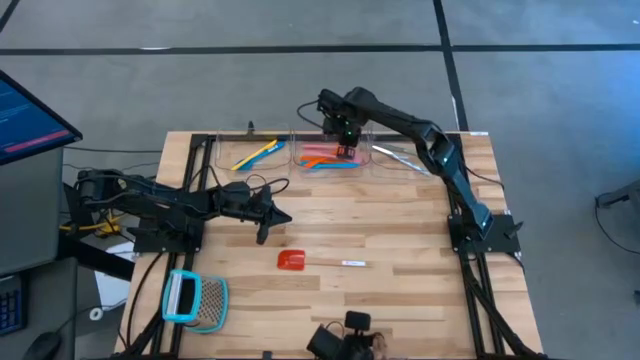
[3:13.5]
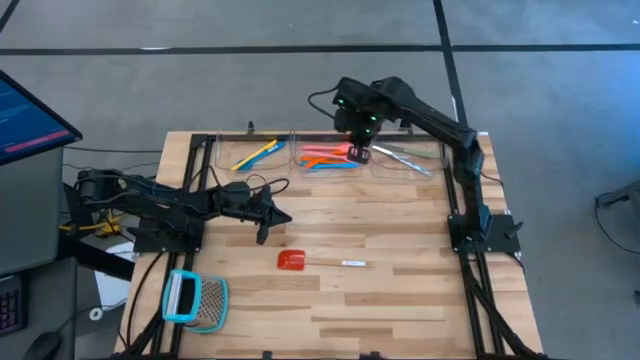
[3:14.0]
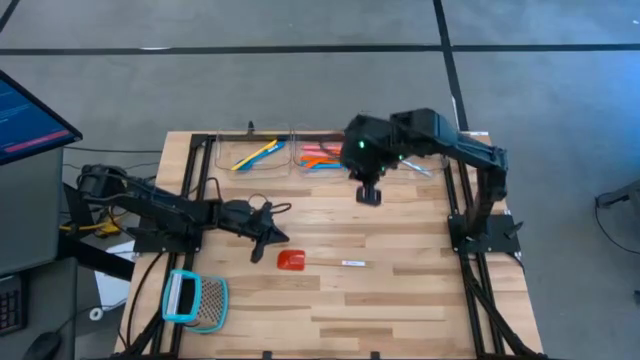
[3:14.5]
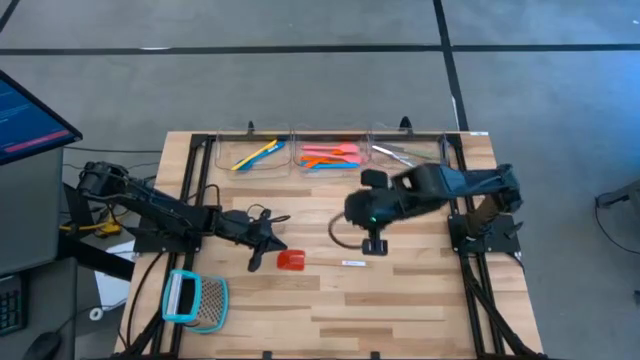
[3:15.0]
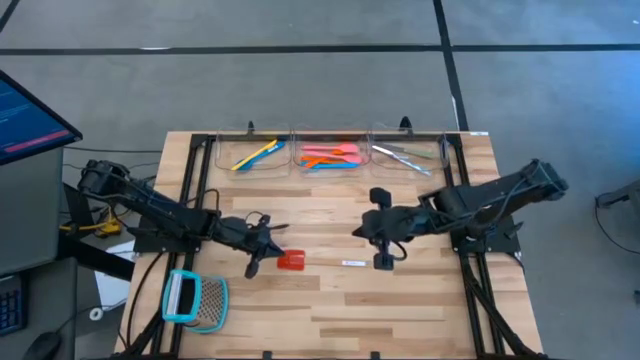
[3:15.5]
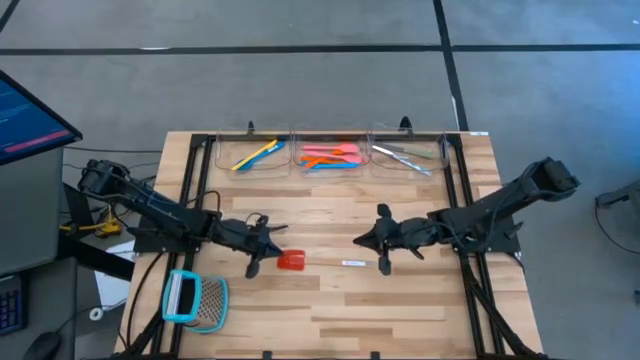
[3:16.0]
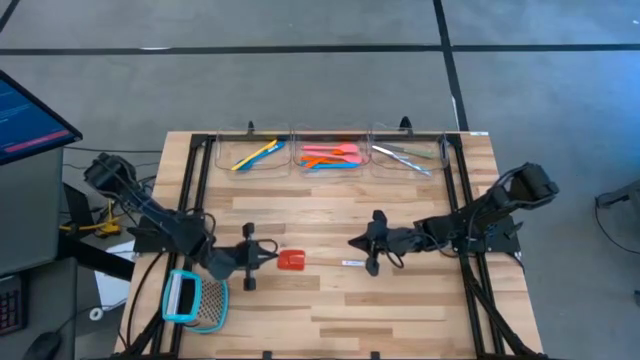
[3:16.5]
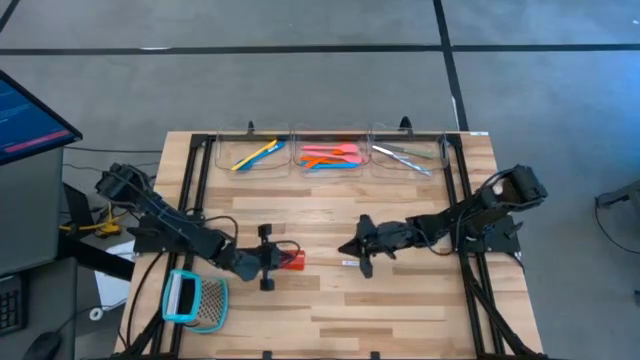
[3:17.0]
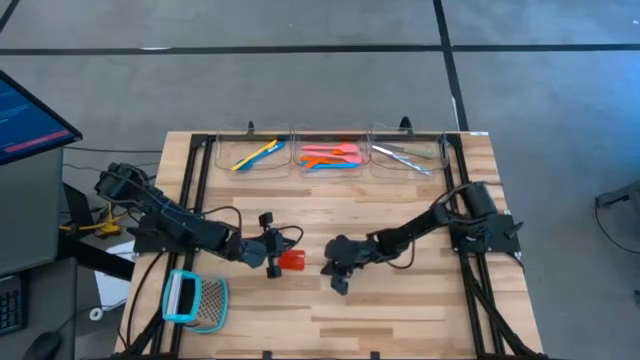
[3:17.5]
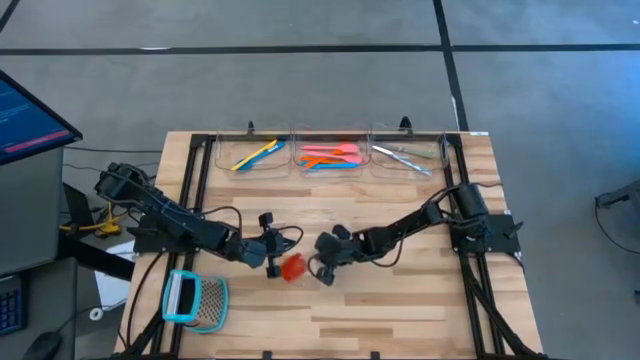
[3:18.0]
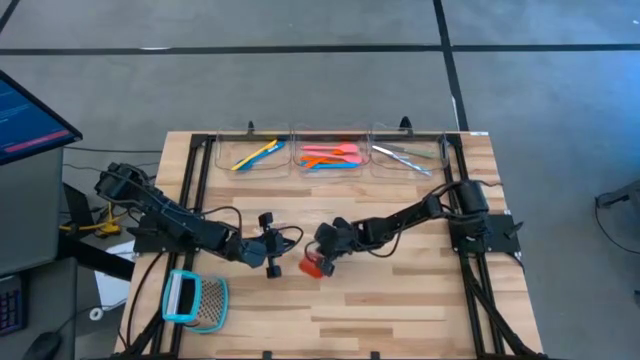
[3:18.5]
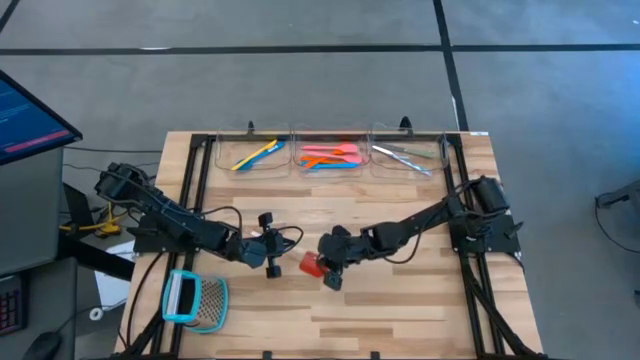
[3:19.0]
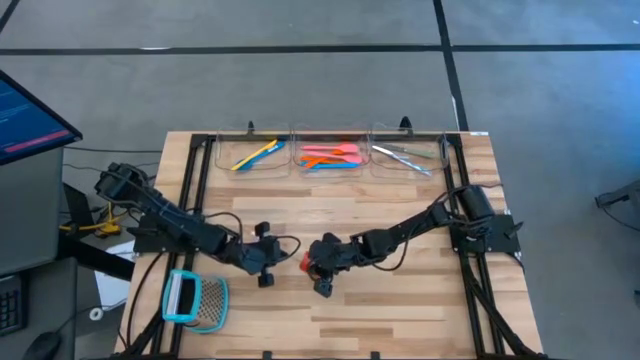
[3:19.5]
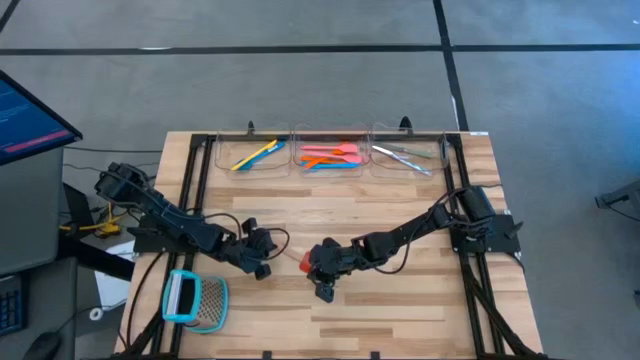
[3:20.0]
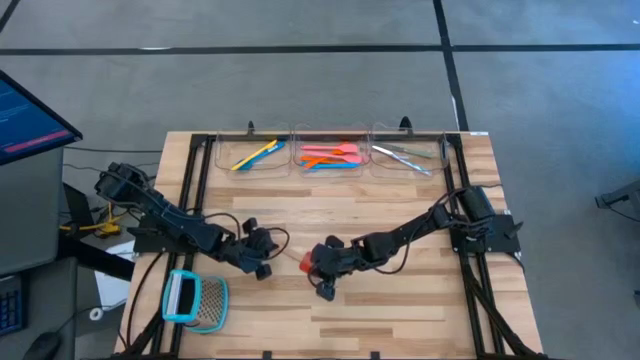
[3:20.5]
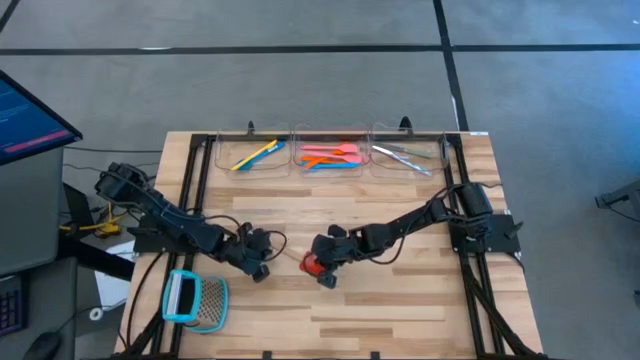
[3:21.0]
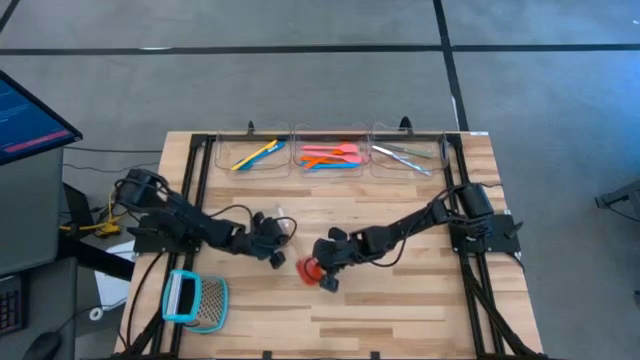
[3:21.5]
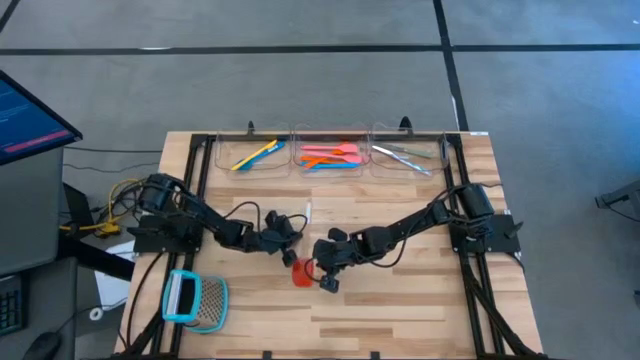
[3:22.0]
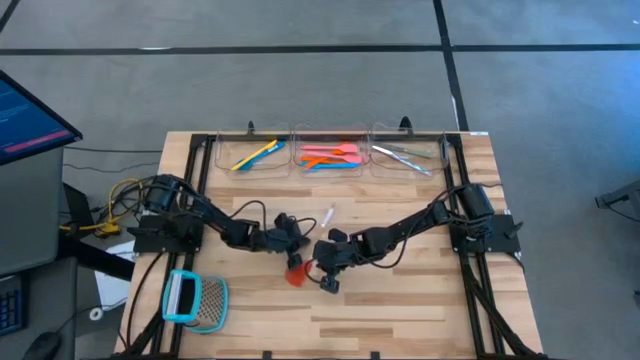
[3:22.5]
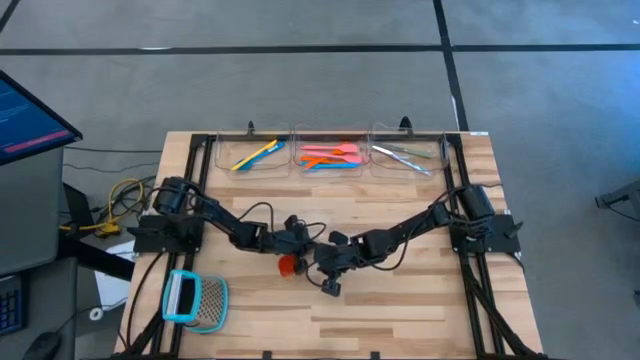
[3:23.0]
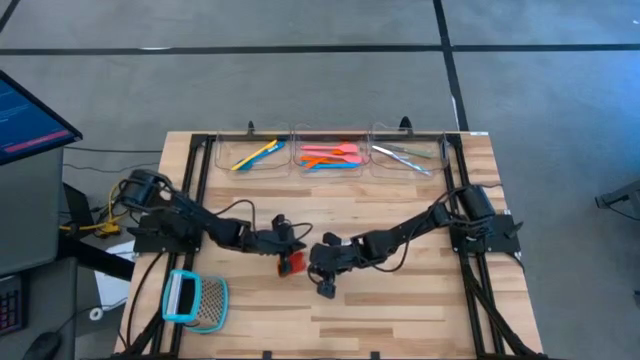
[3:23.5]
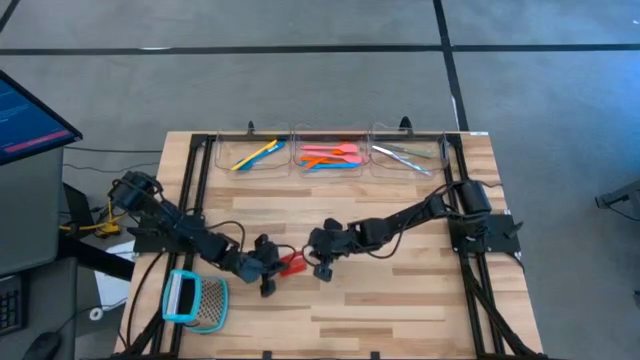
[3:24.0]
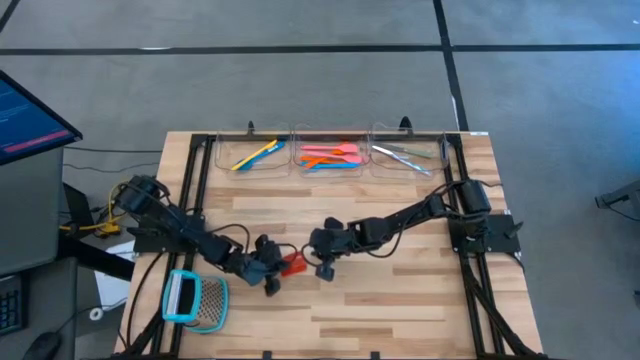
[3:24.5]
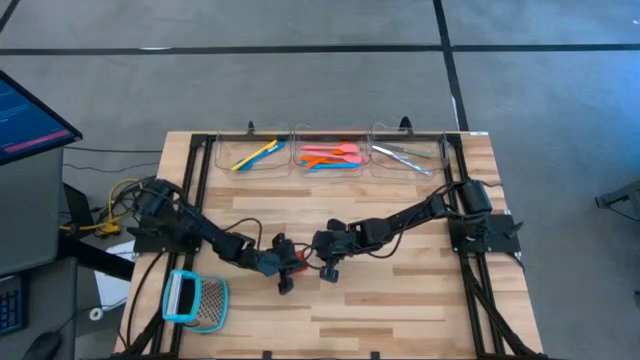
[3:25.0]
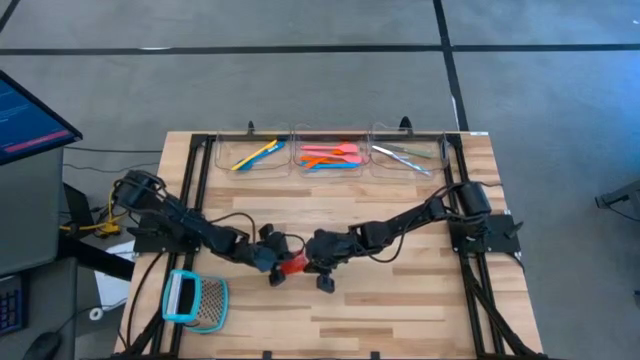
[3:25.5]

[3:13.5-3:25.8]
Task: Pick & Place Kitchen Items
Put the red spatula into the middle transparent bin

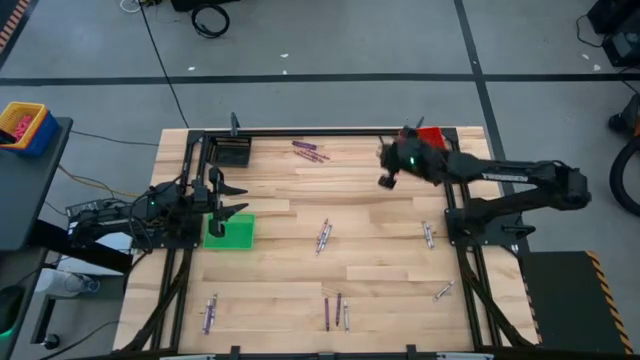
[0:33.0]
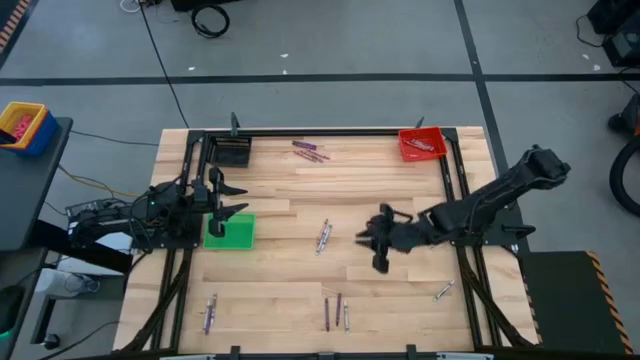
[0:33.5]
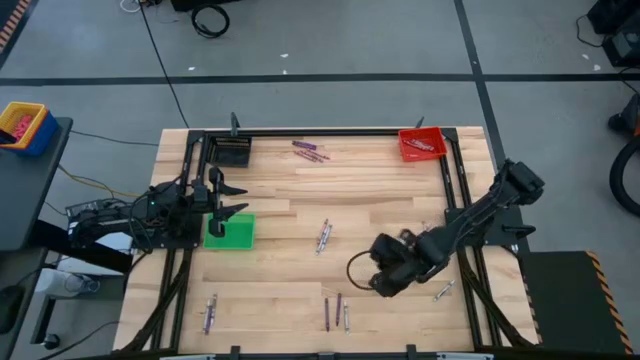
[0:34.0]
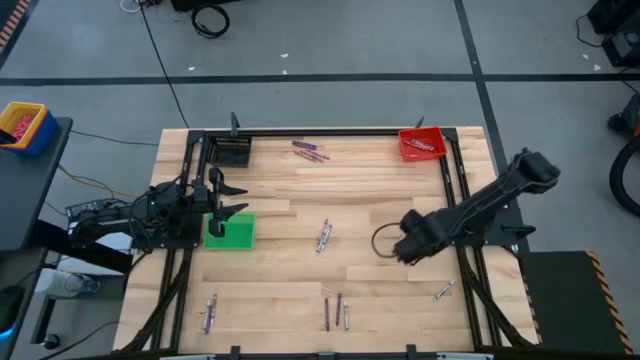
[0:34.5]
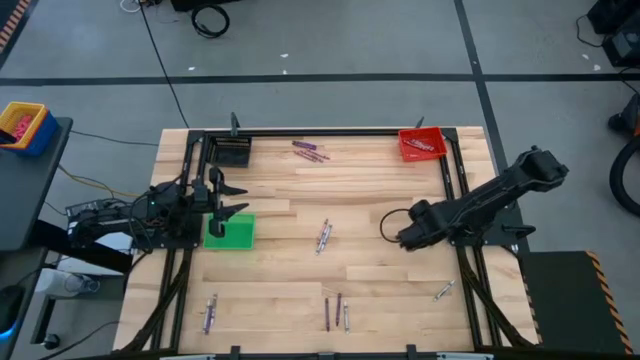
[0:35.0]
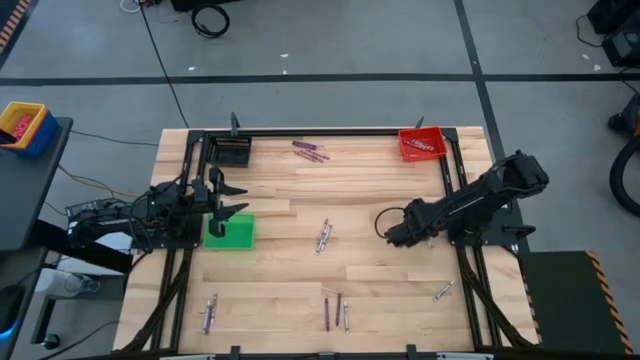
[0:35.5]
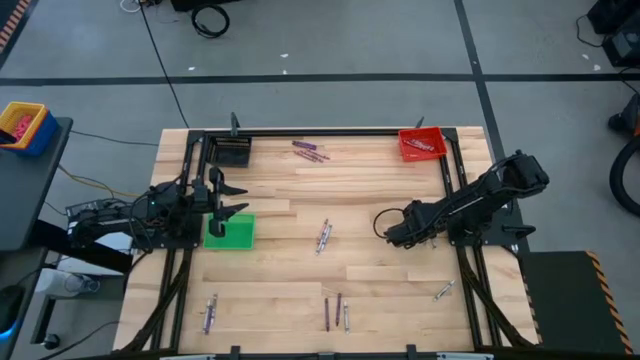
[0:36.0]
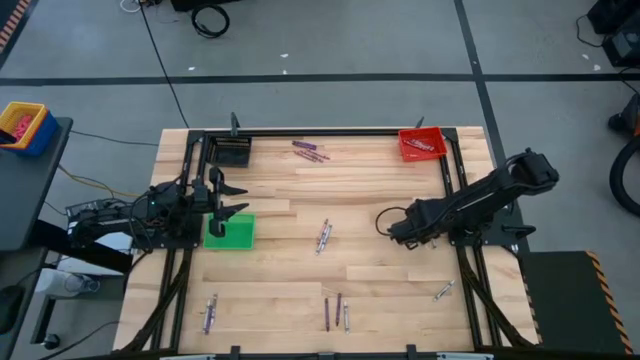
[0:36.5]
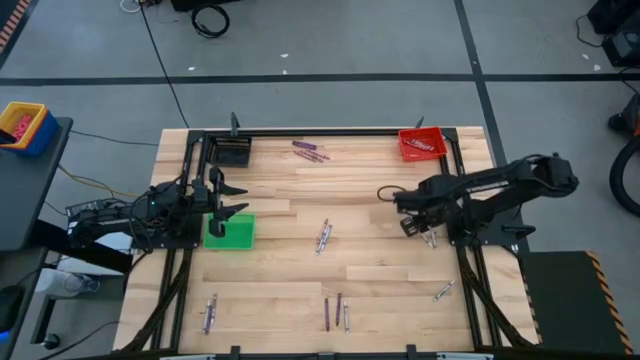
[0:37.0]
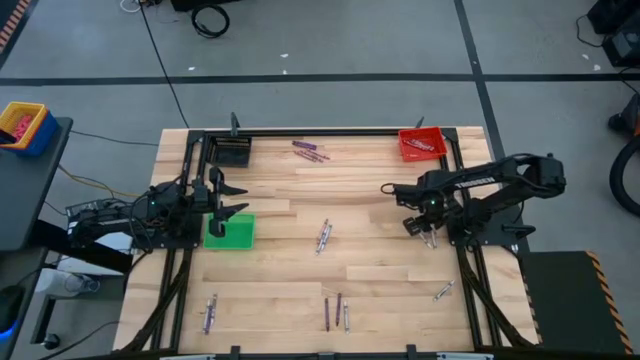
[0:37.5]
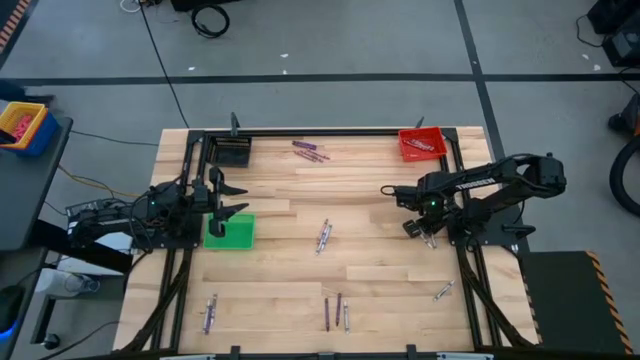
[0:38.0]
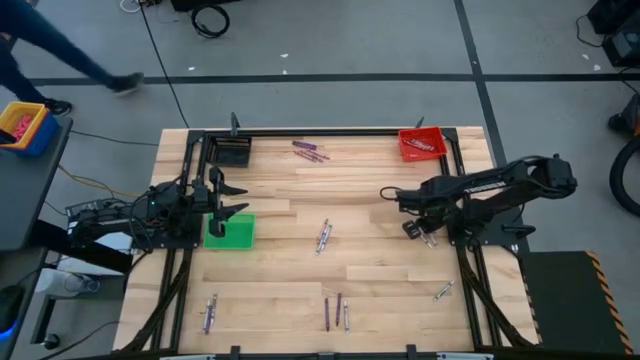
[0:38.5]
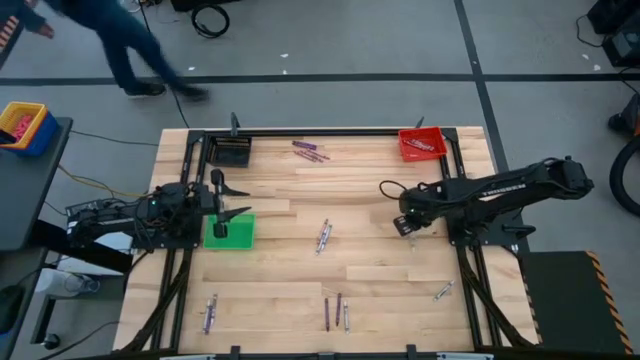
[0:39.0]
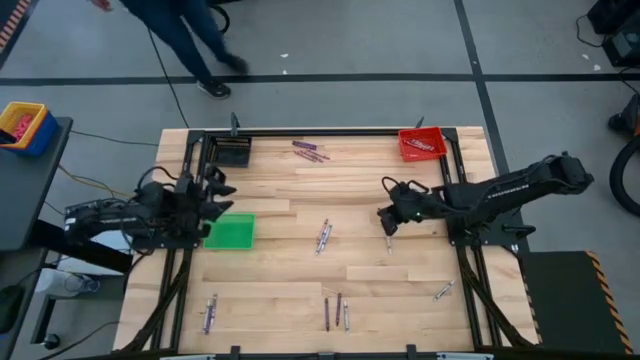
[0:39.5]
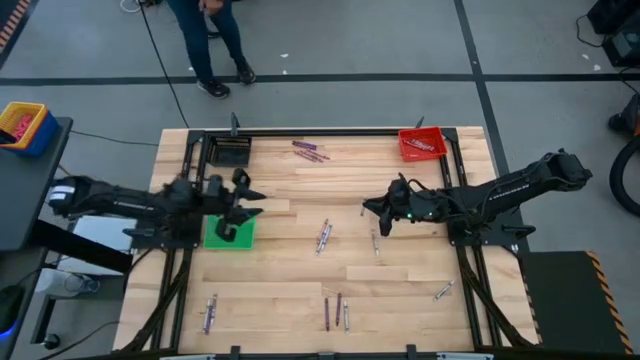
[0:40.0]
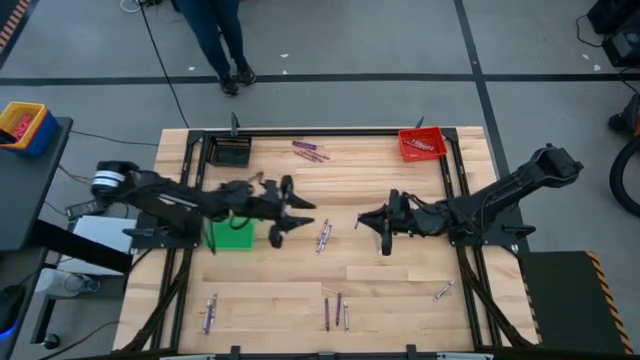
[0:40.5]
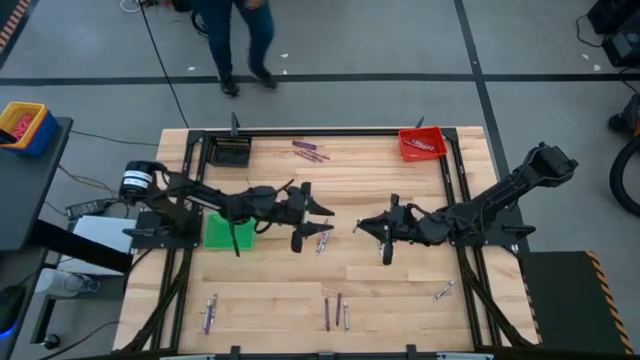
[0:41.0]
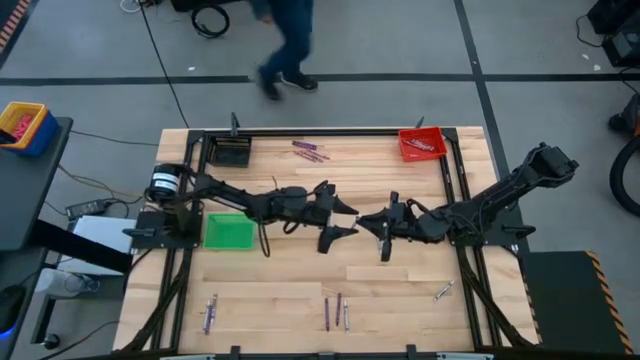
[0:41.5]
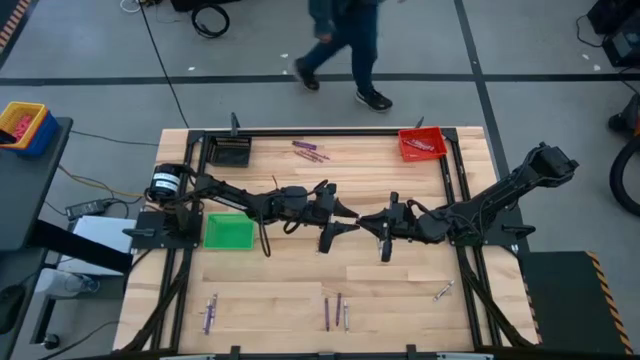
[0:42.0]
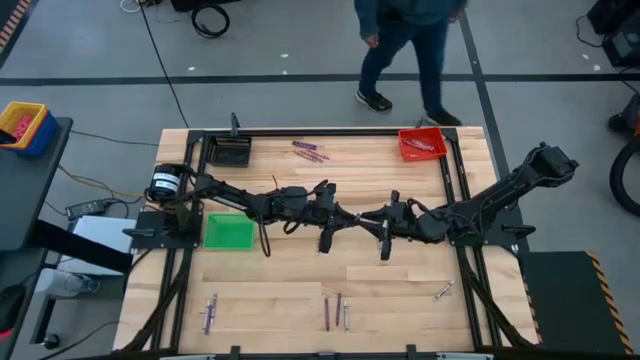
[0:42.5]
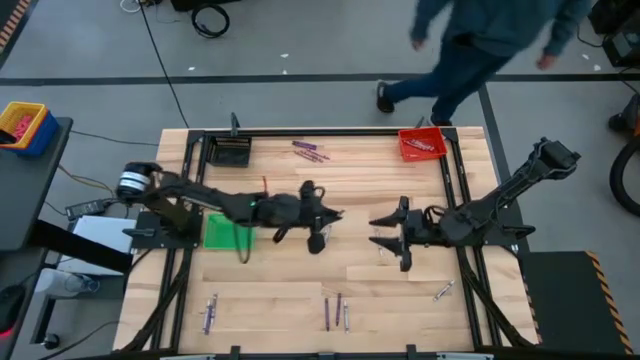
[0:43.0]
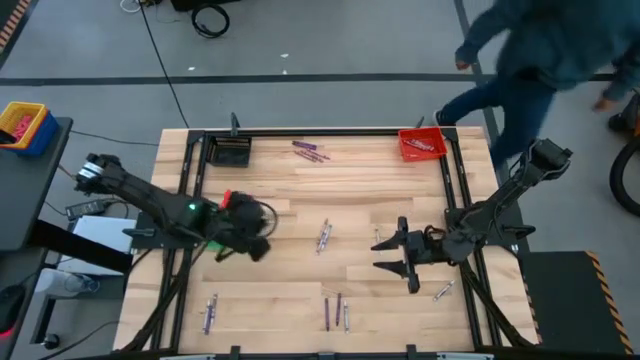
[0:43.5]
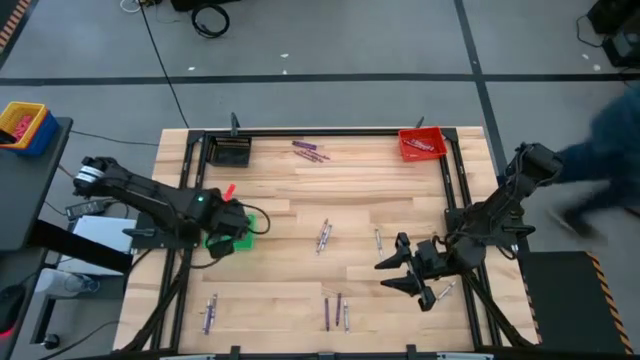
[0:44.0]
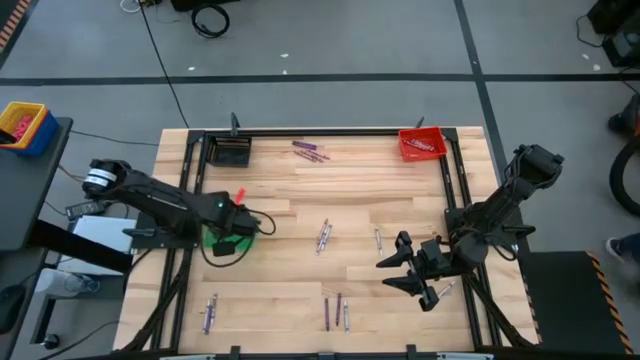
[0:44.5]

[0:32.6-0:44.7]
Task: Sort crayons
Put the white crayon into the green bin
